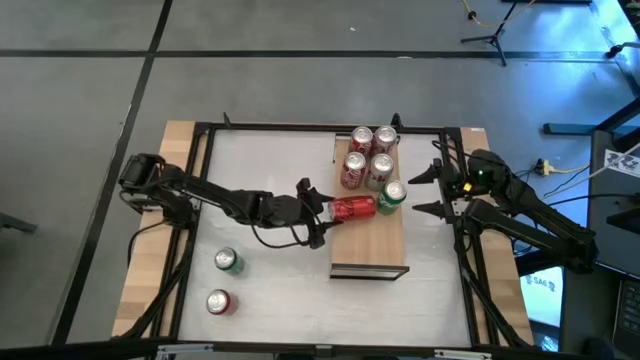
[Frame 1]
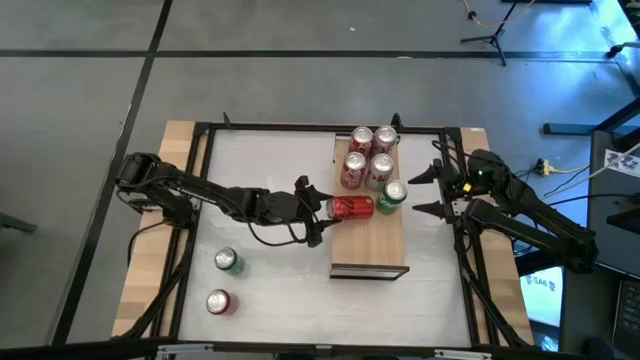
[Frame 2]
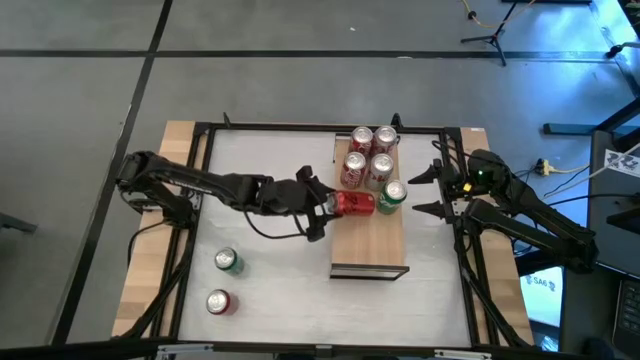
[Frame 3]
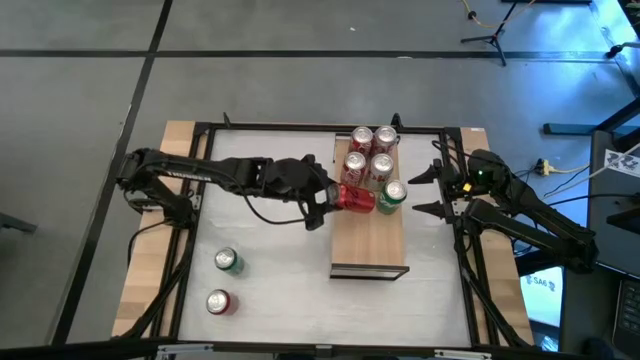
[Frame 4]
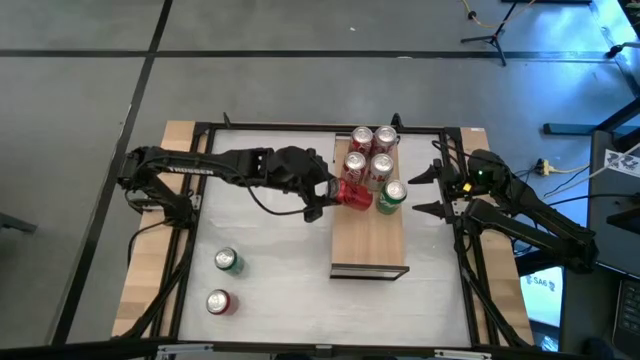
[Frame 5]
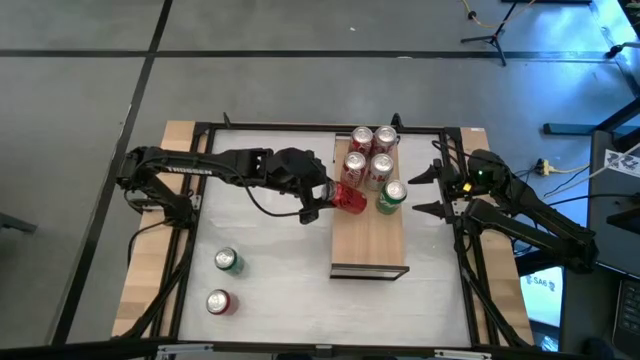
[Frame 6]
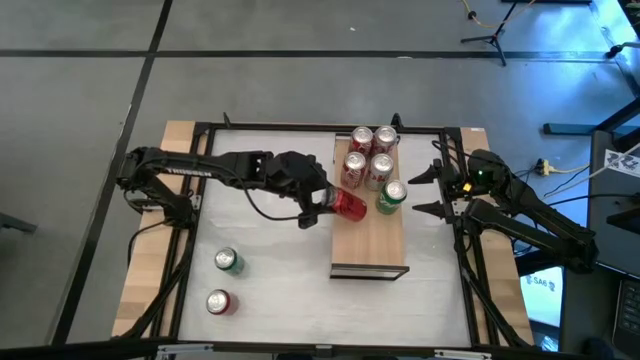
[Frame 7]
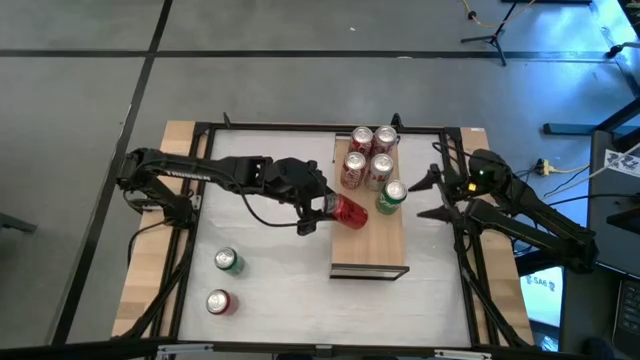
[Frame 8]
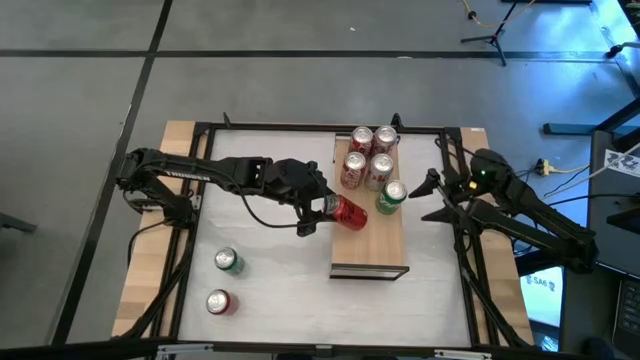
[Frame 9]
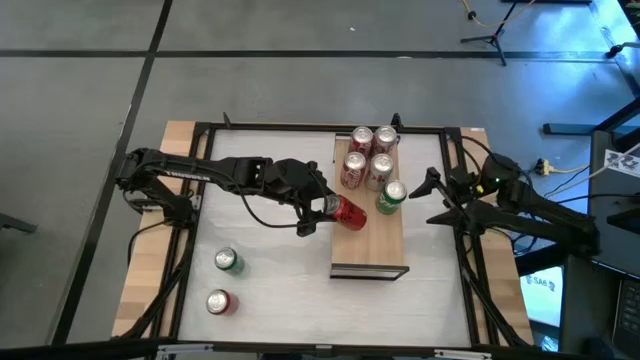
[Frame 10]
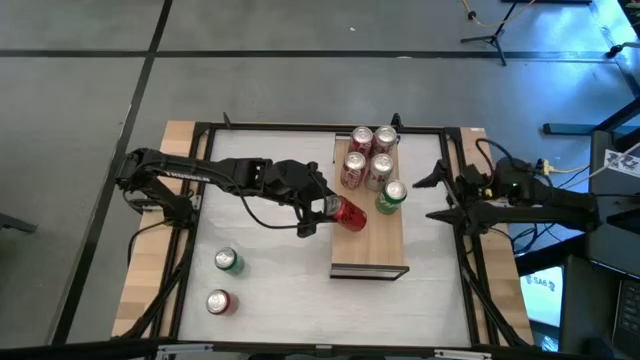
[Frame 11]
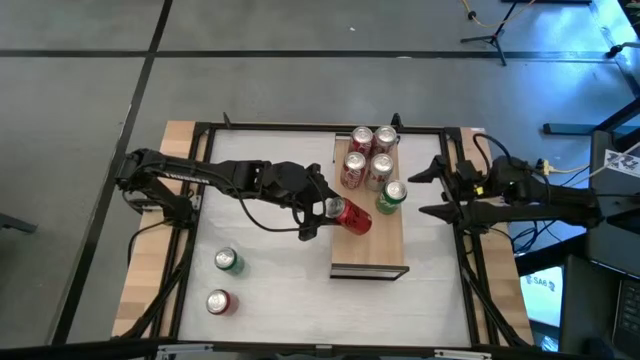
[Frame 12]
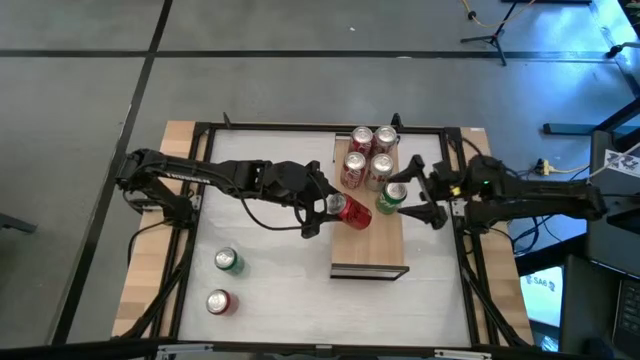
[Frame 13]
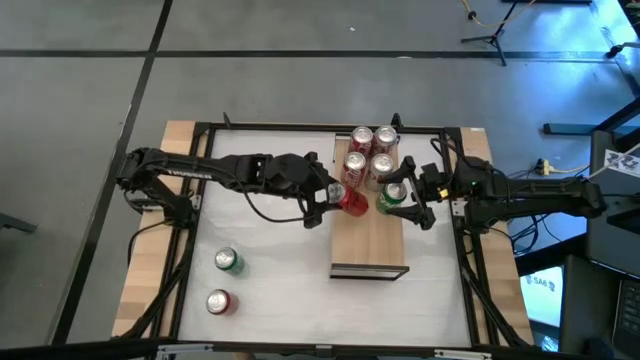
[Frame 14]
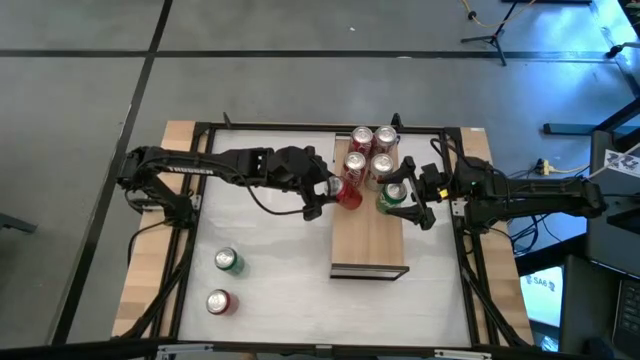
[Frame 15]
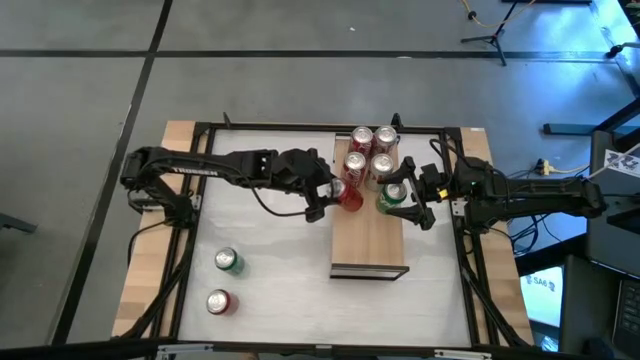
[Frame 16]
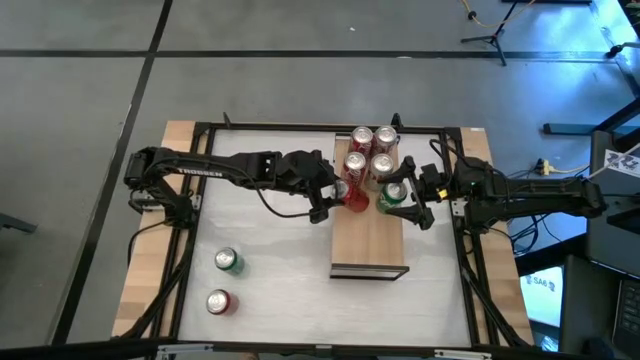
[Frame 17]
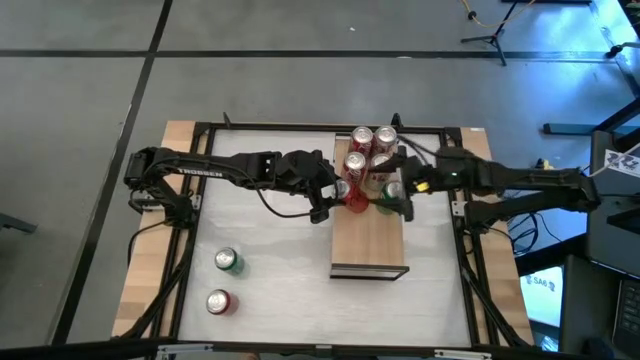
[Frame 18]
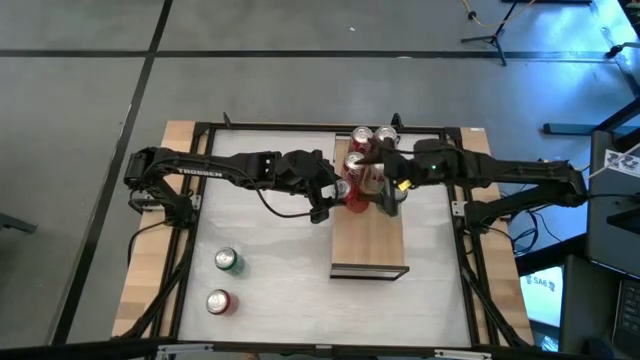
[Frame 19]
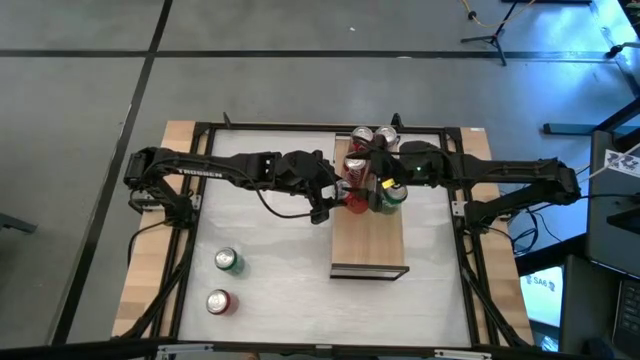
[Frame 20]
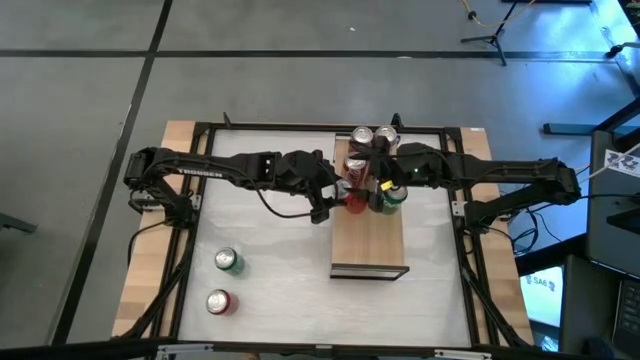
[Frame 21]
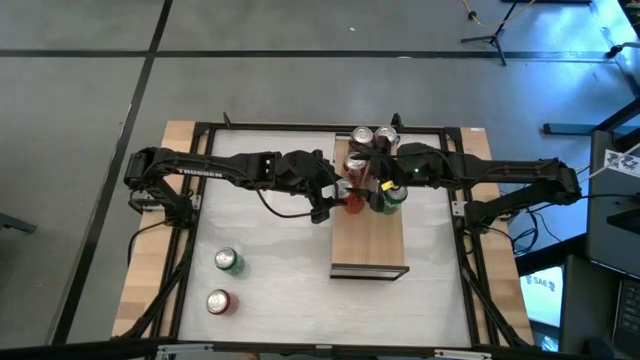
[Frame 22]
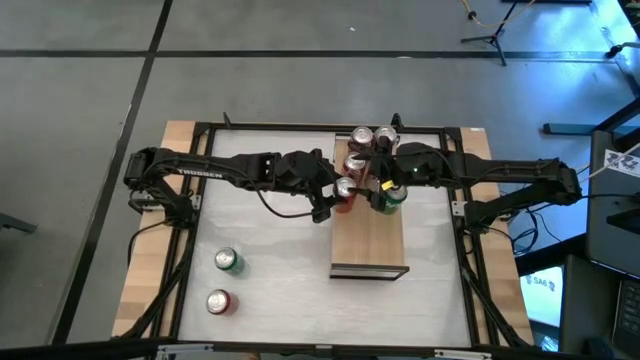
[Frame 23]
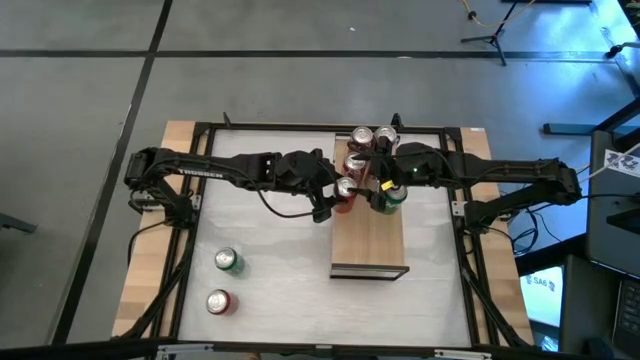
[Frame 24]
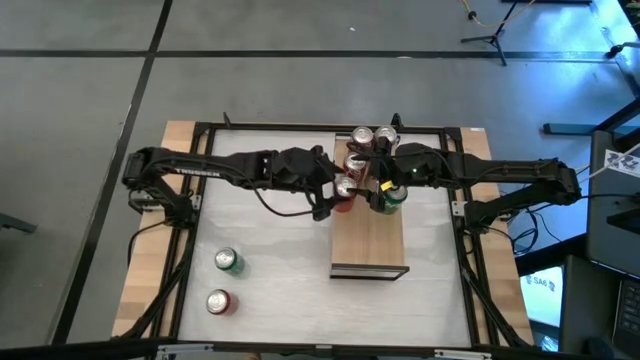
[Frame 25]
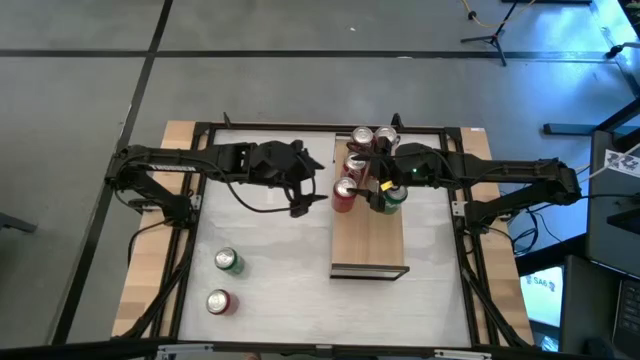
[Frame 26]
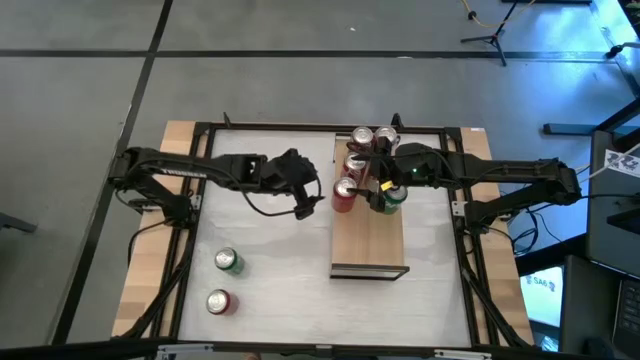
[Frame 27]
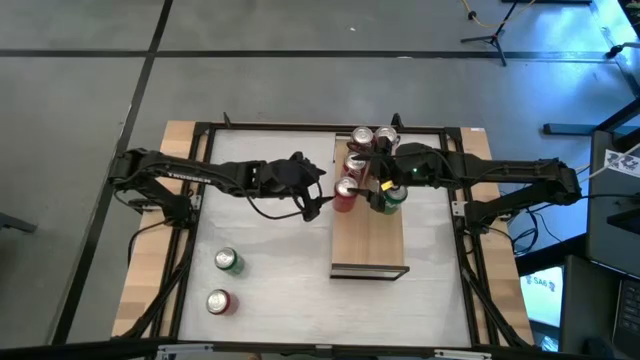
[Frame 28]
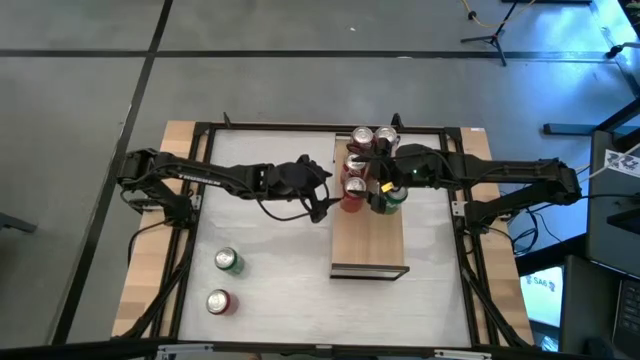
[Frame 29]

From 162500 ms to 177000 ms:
Task: Place canned beverage on shelf
Put the top red black soda can on the shelf

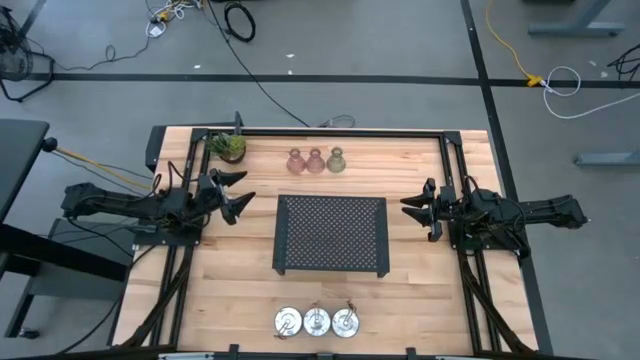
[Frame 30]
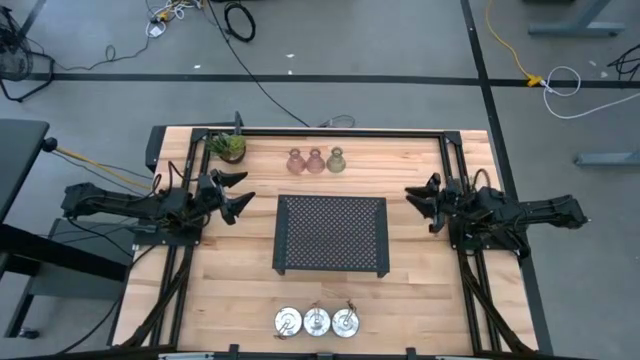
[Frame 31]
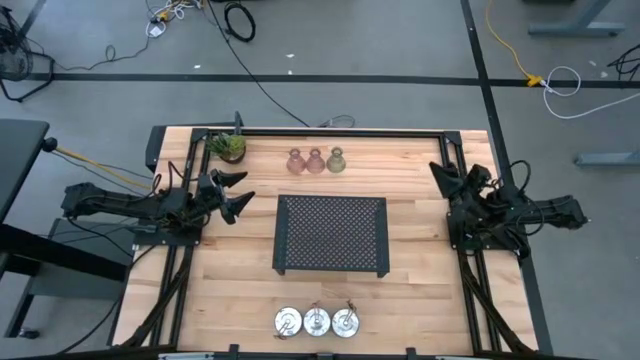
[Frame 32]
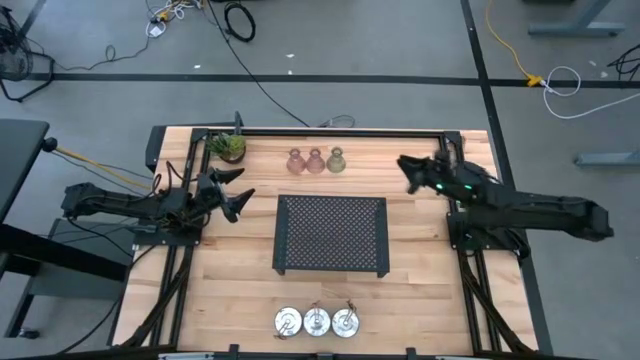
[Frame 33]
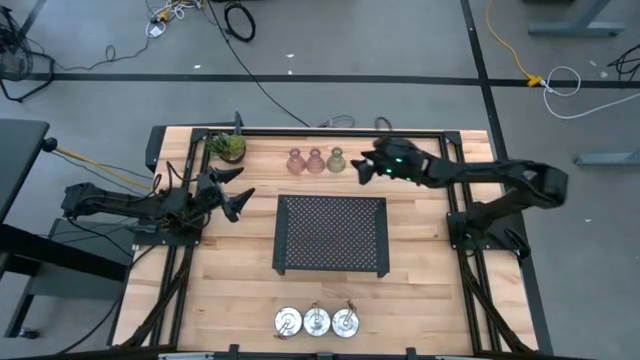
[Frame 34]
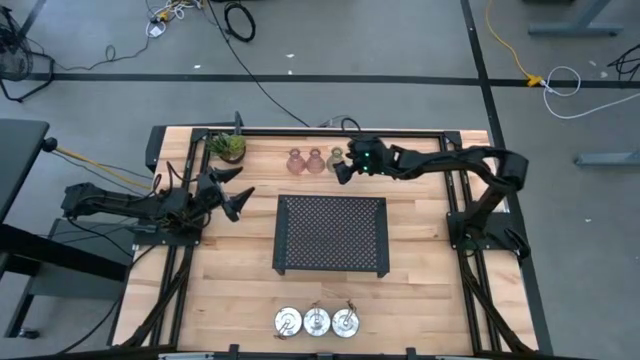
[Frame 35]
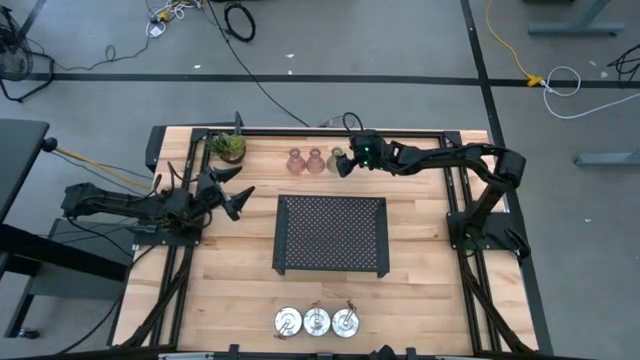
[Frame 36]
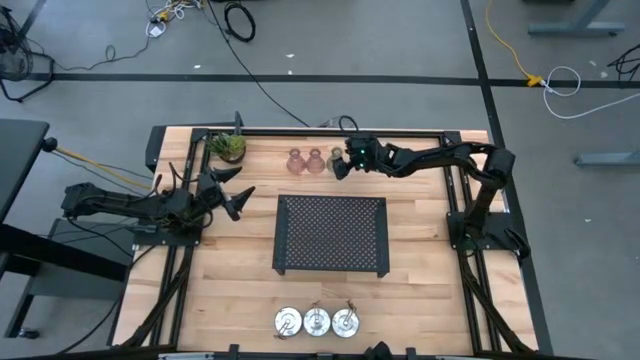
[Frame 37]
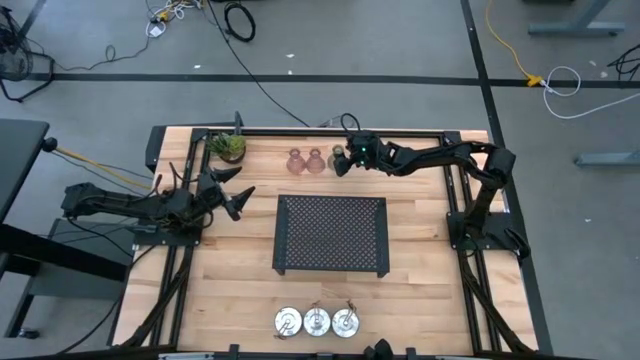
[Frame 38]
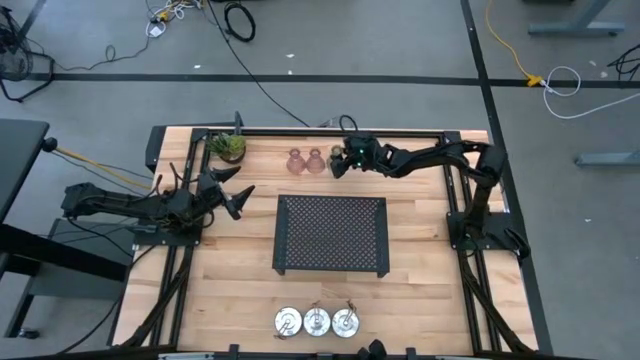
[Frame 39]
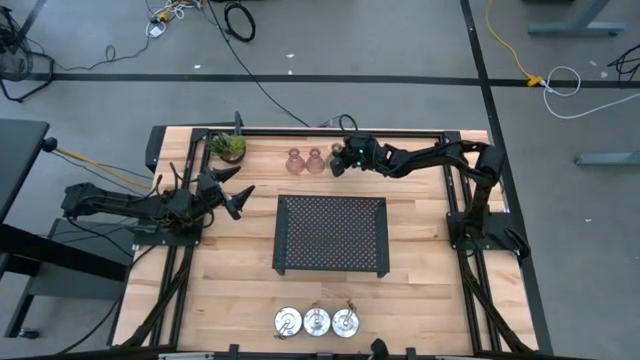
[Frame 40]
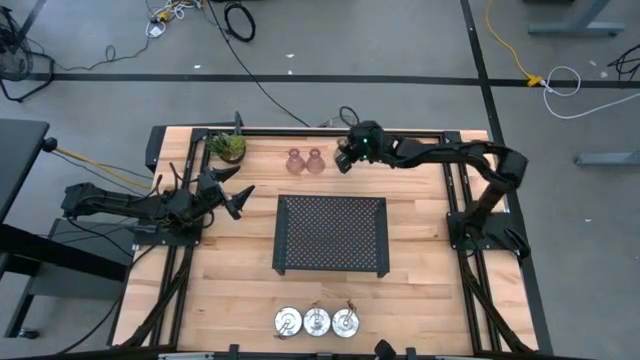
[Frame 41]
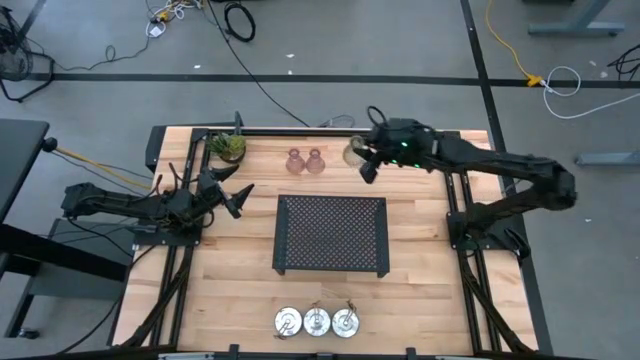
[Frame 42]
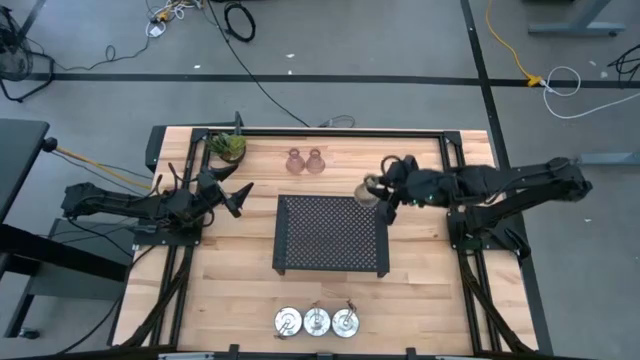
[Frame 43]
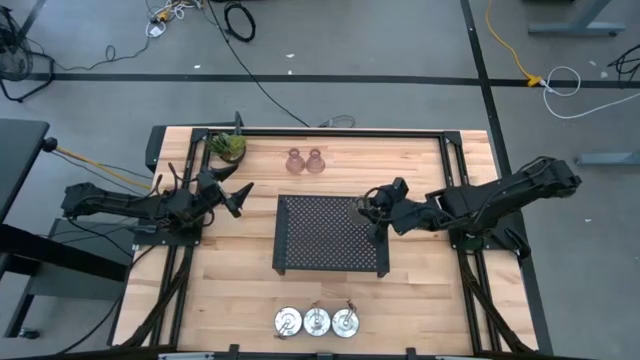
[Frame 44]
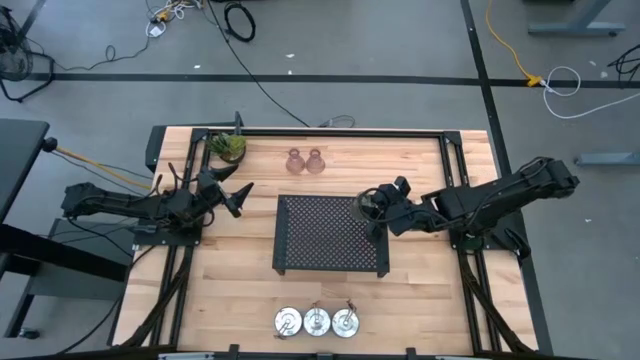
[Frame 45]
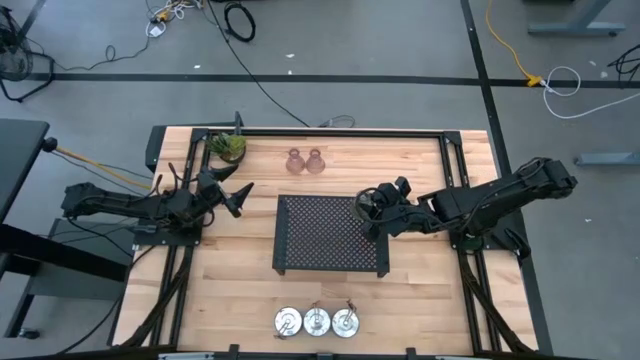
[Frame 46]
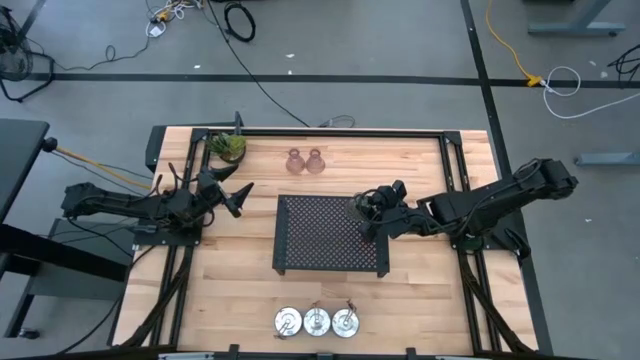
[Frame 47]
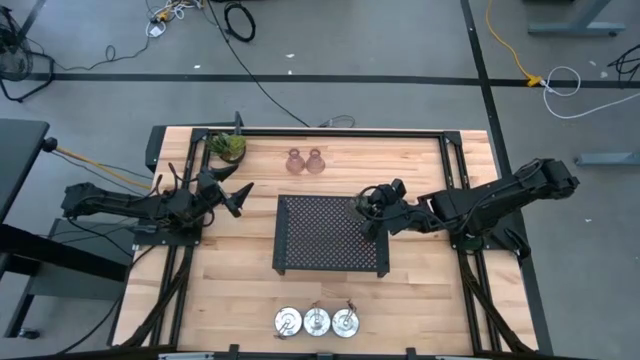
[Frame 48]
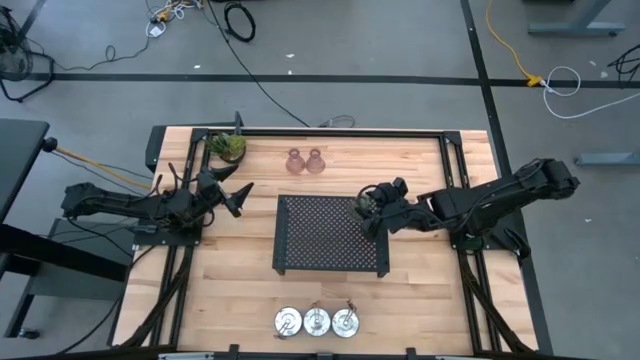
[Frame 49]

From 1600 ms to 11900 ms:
Task: Pick & Place candle stick holders
Put the green glass candle holder on the shelf
